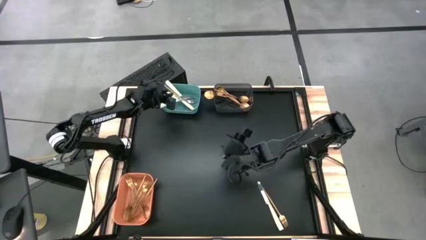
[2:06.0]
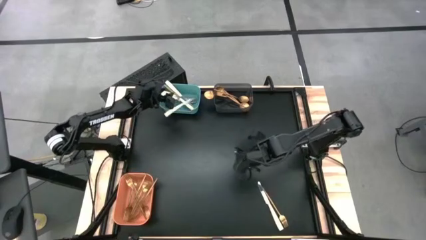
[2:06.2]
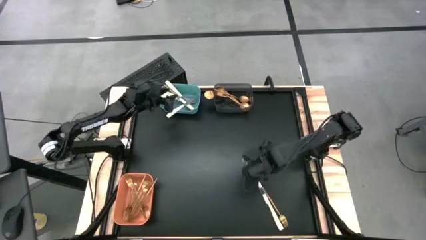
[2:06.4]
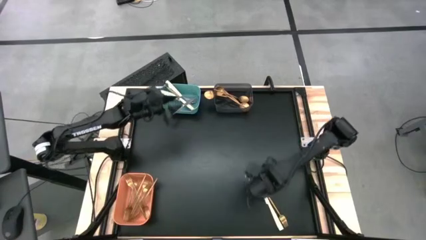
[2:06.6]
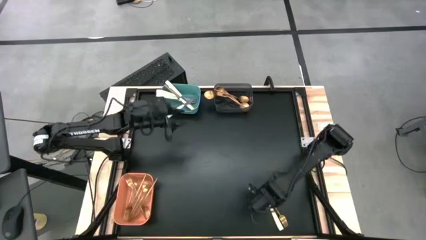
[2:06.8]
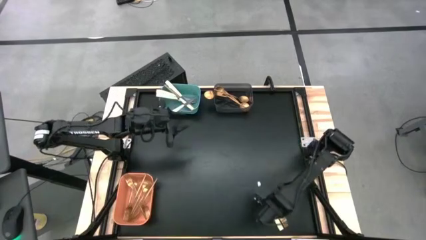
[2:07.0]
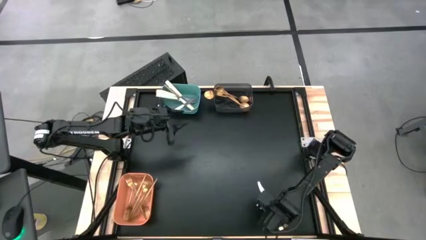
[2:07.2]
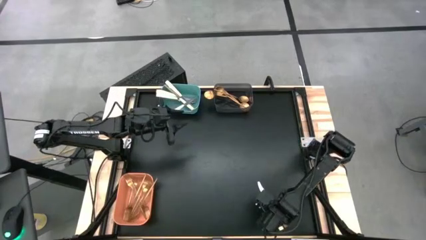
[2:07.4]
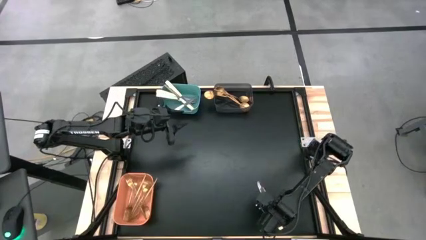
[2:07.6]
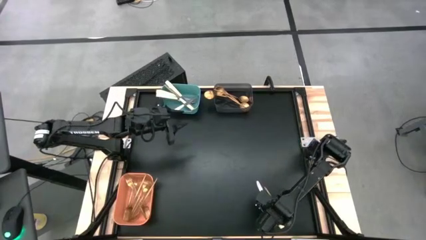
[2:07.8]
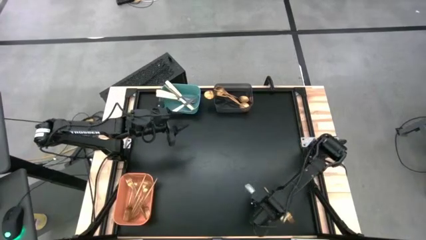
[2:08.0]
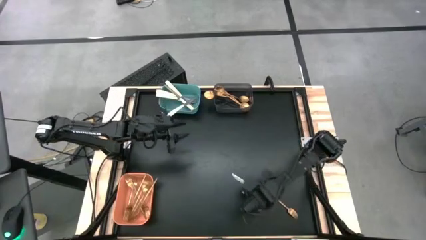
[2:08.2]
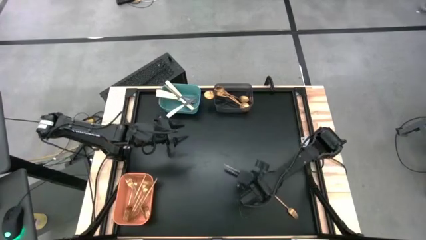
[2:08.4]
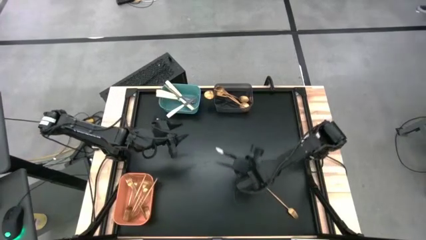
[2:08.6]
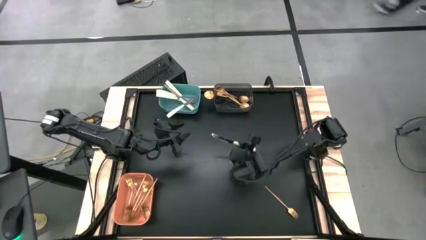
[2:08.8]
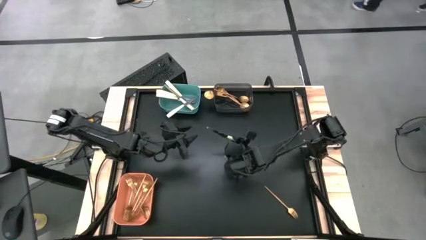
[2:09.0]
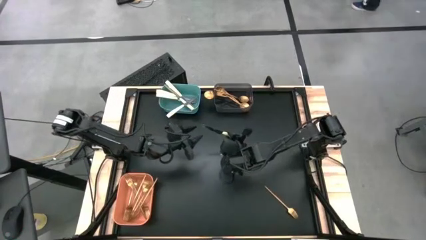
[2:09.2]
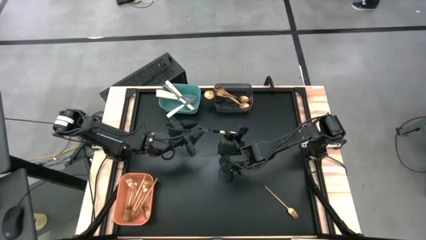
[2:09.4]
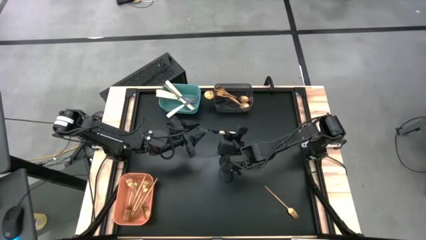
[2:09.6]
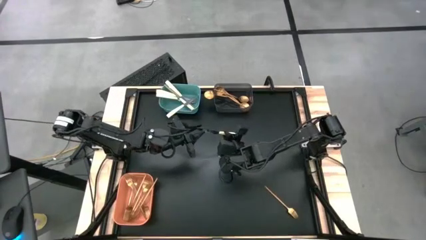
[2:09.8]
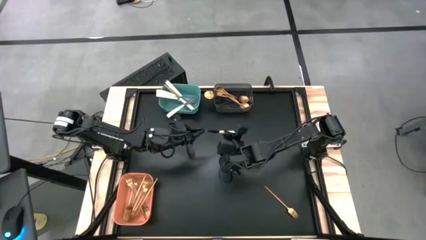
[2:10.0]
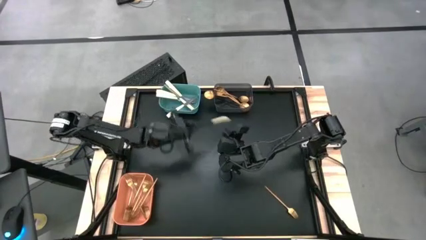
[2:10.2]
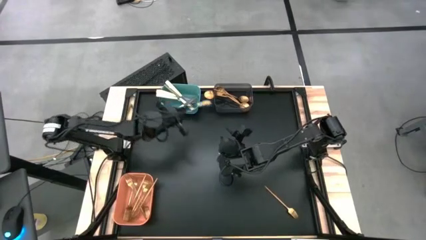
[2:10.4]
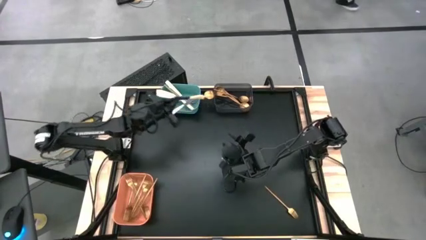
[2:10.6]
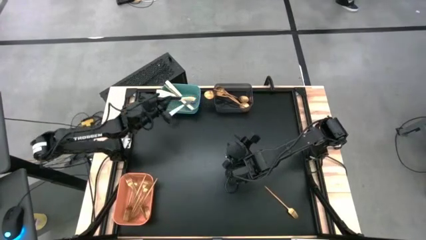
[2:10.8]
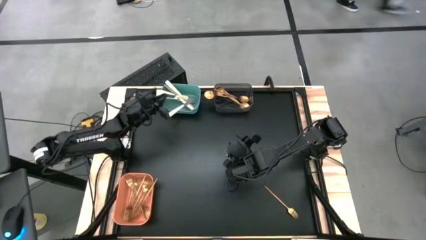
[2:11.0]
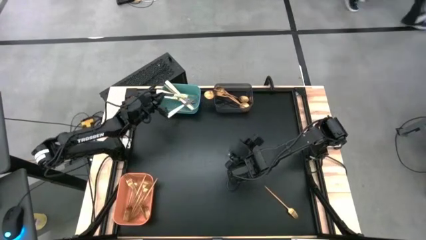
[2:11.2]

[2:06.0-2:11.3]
Task: Sort silverware by color (type)
Put the silver knife into the light blue bin

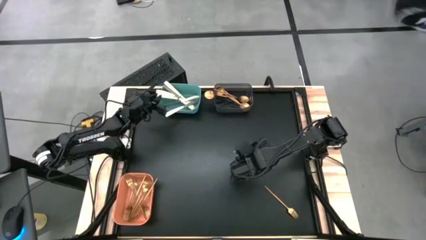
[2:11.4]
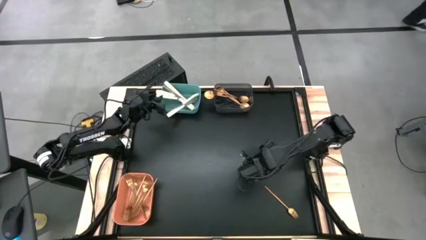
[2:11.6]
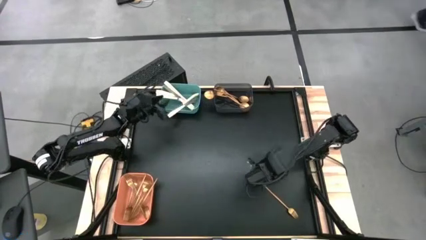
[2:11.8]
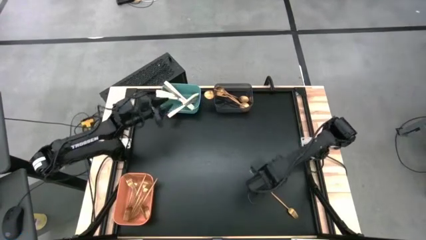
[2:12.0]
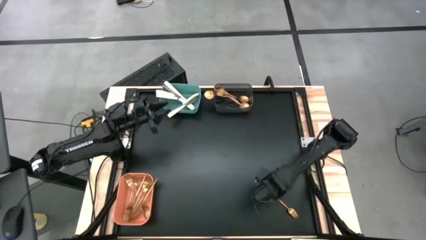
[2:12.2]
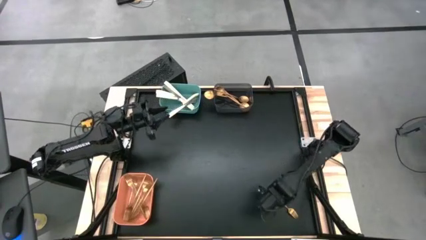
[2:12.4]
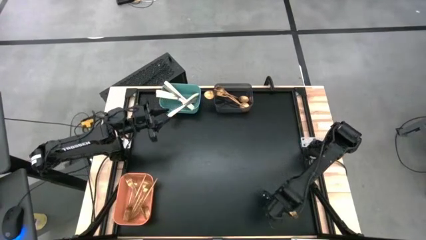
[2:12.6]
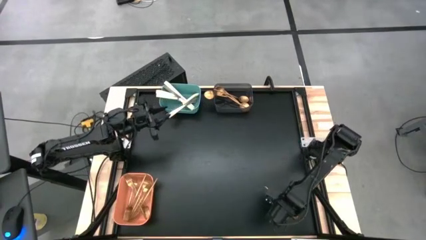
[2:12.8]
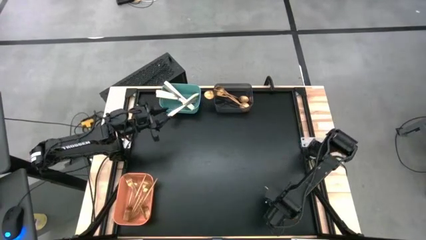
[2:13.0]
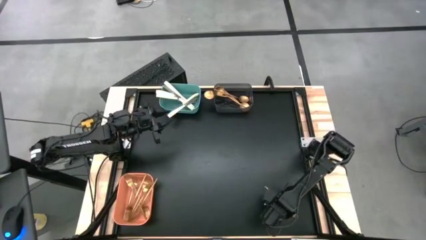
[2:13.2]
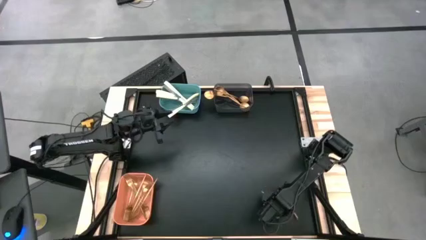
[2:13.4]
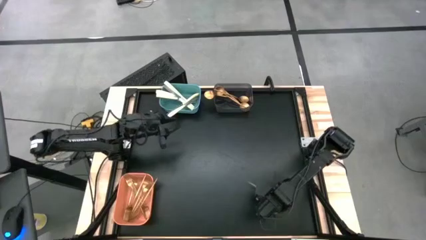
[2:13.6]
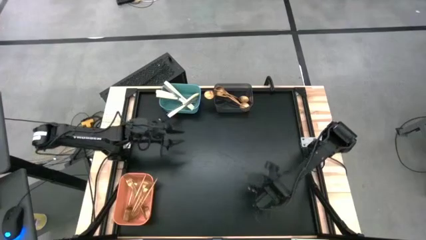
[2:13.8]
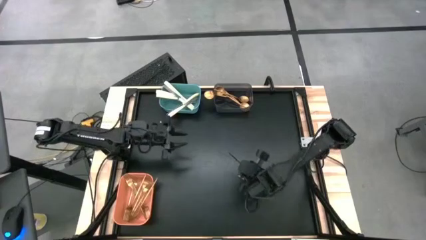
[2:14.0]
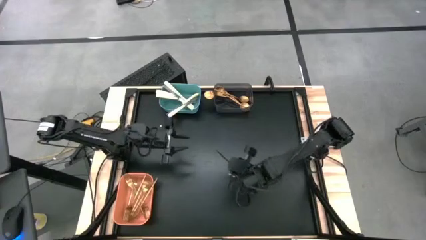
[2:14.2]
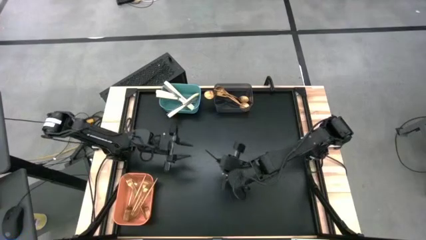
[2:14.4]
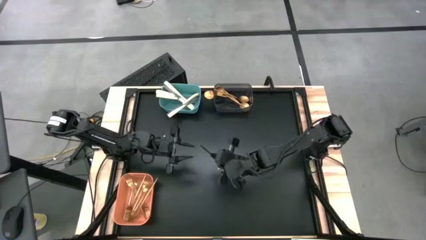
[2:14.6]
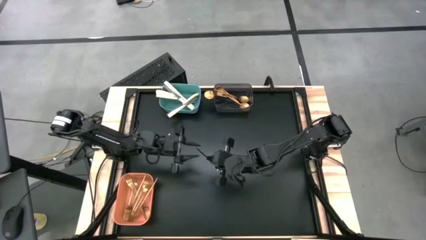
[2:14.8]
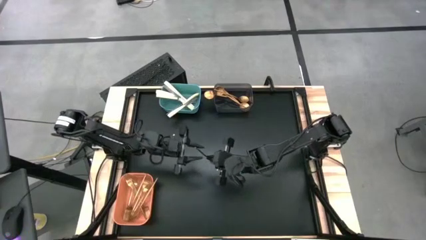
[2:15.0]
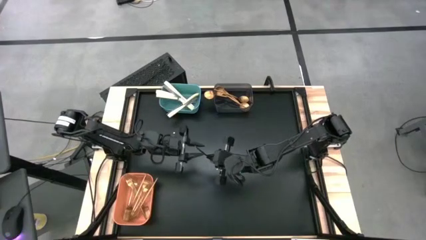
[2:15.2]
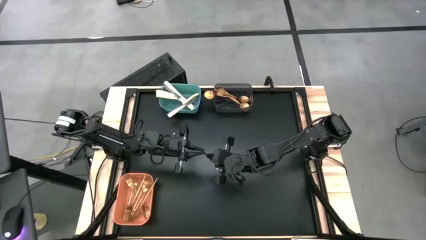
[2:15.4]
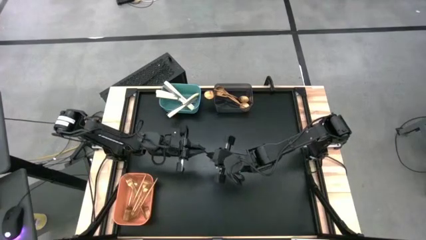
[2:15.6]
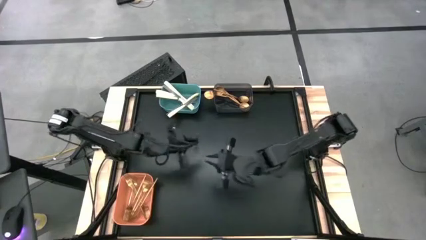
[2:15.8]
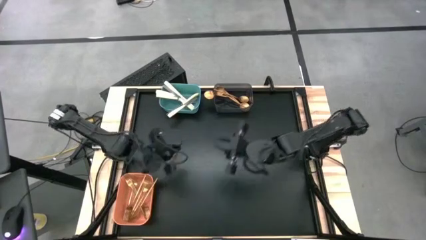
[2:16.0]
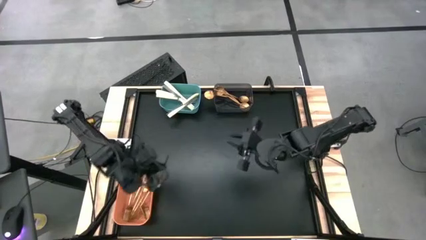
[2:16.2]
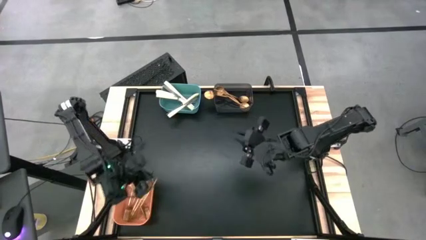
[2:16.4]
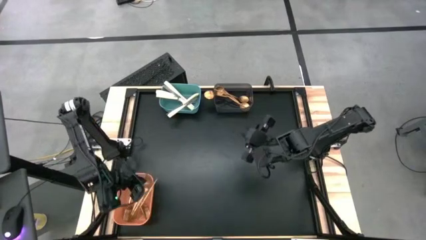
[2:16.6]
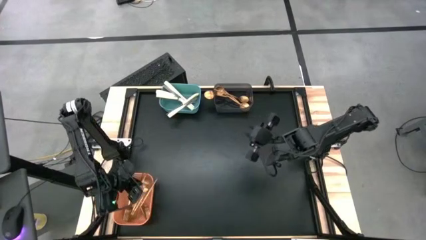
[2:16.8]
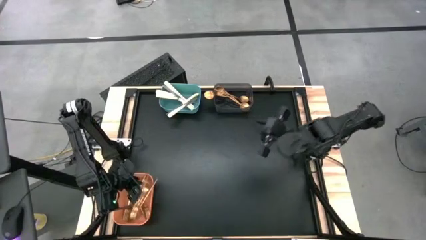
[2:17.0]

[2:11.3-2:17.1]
Put the gold fork into the orange bin

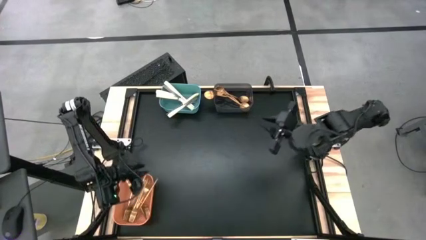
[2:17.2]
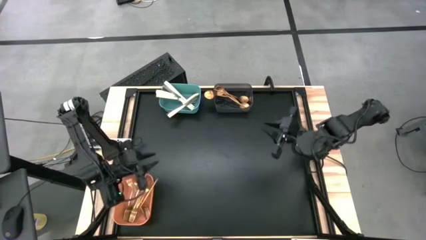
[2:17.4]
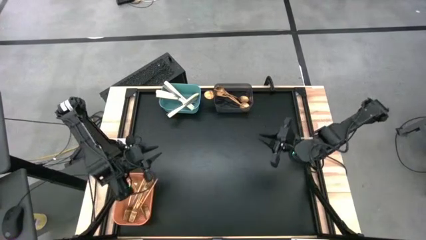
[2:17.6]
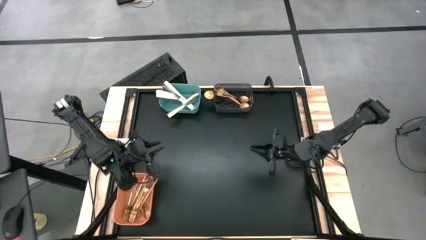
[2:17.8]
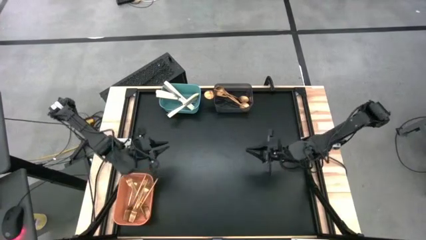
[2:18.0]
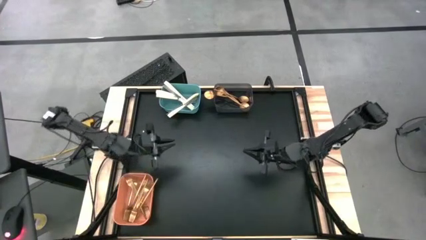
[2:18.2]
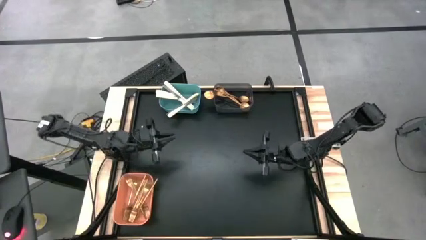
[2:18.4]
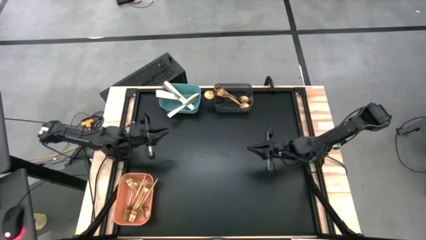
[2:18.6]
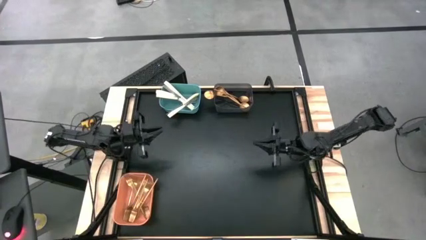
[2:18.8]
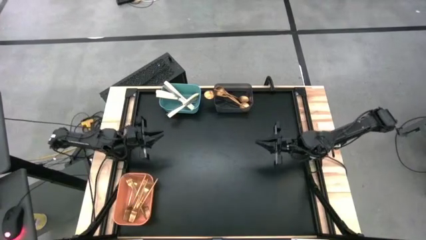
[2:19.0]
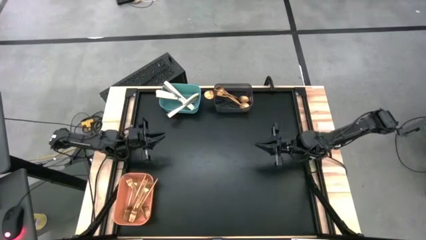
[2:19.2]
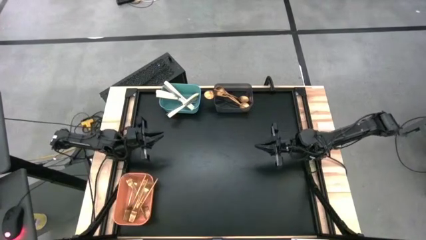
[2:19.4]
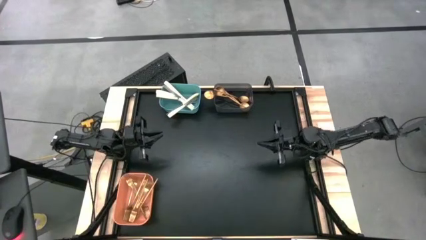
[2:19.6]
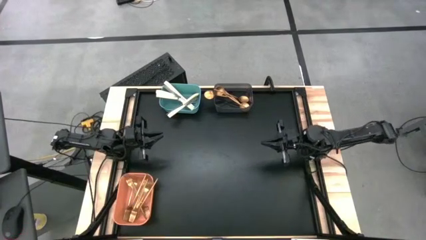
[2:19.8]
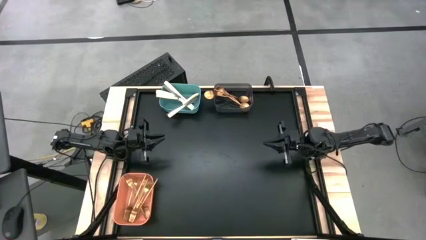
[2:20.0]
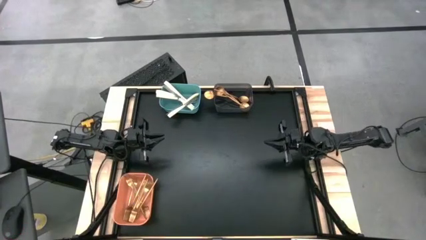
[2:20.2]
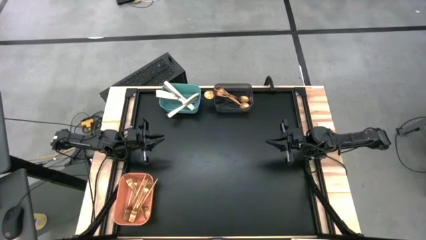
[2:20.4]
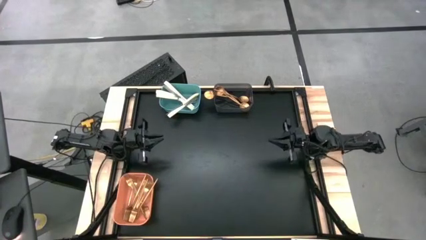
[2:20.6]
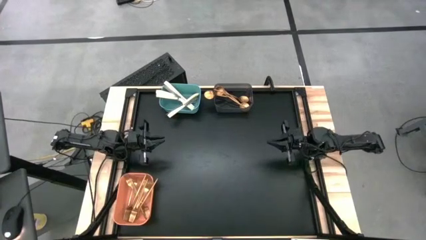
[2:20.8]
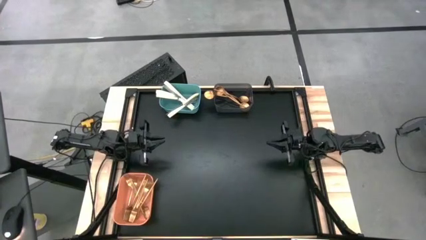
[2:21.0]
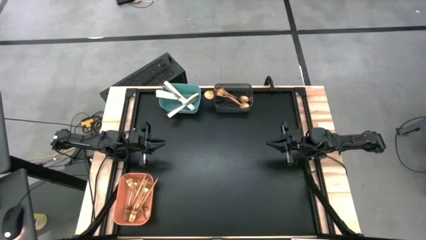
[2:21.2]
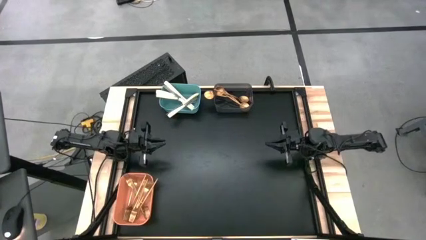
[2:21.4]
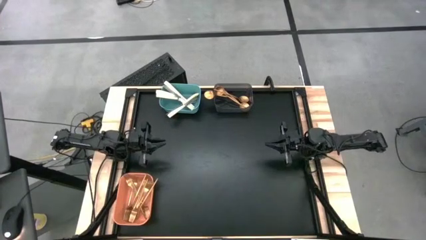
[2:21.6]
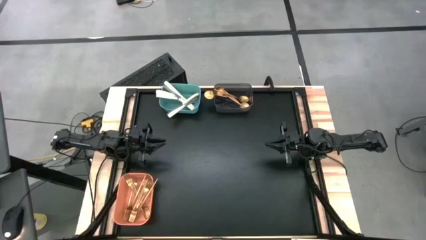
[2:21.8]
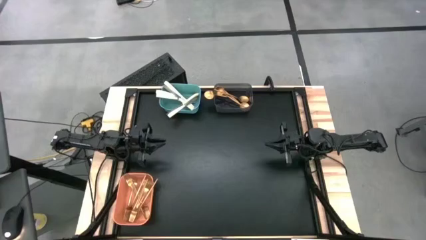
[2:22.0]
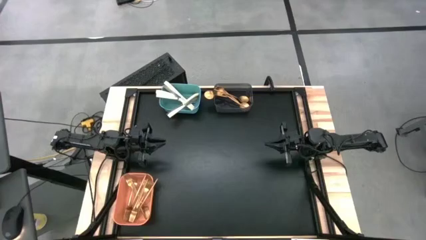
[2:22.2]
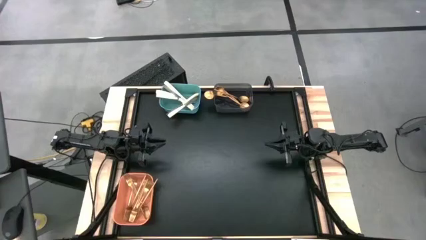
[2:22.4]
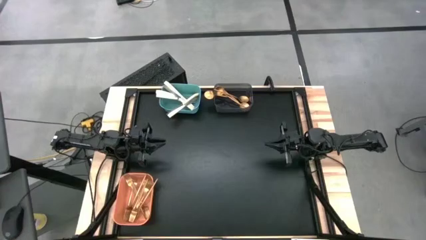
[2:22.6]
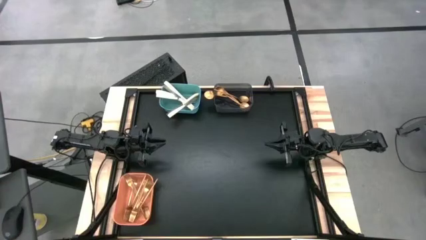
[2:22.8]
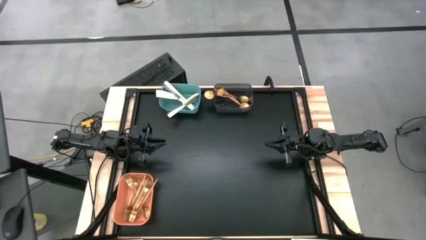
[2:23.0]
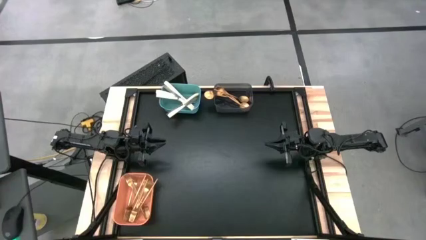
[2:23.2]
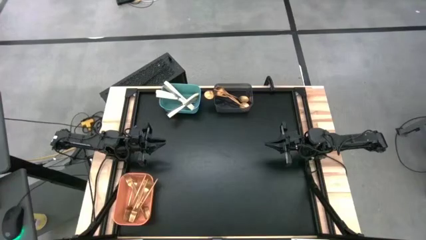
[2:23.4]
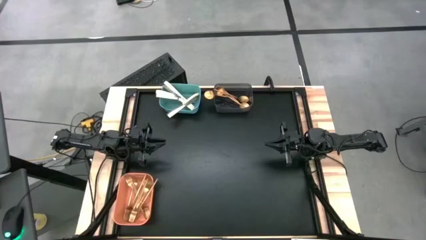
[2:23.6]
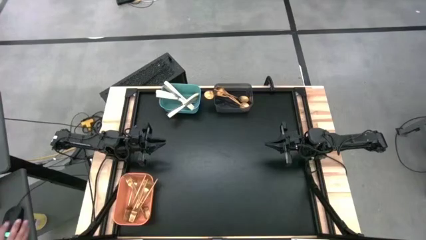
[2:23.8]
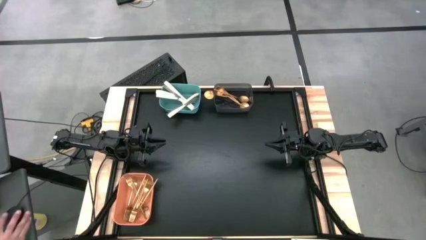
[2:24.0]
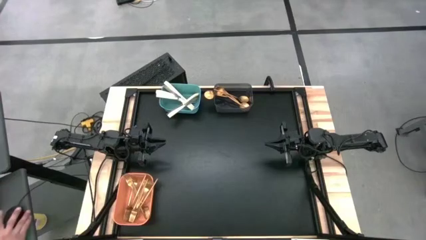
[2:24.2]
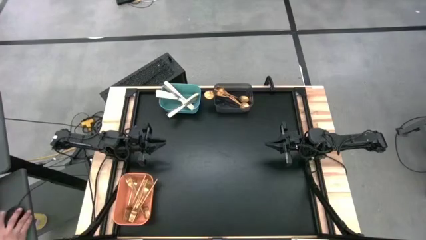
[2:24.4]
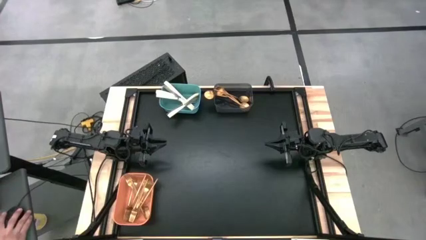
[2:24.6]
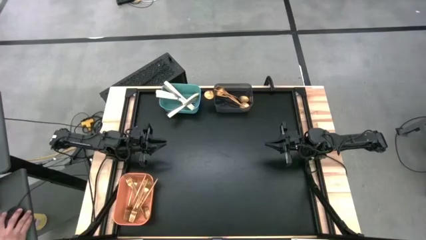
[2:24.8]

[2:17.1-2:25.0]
Return to Home Position
